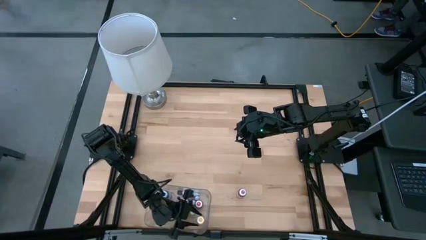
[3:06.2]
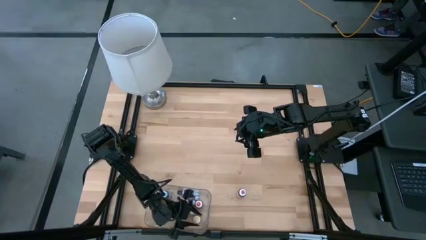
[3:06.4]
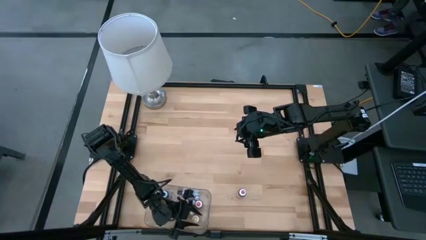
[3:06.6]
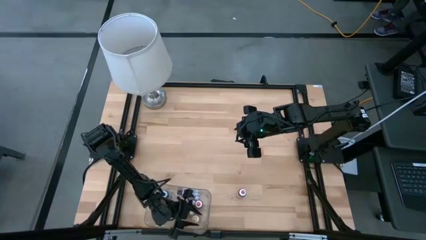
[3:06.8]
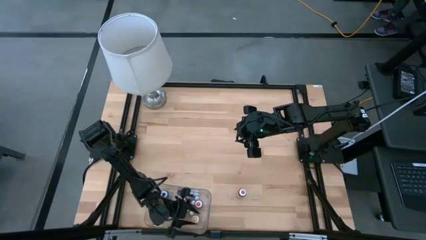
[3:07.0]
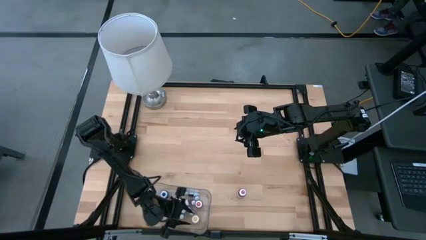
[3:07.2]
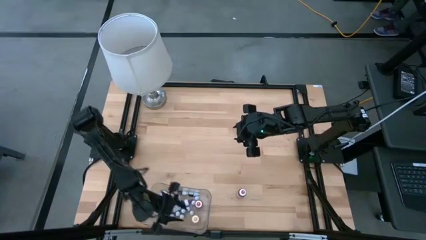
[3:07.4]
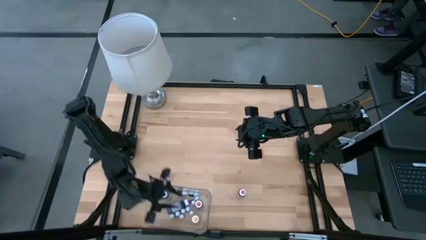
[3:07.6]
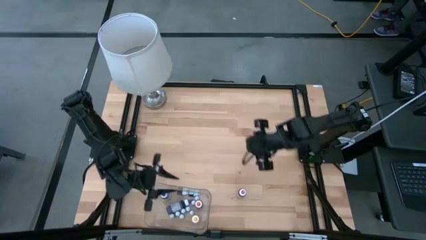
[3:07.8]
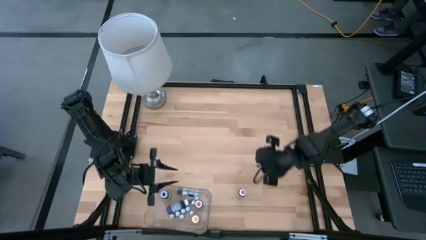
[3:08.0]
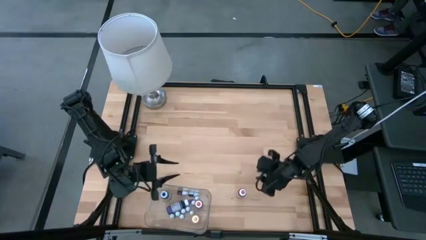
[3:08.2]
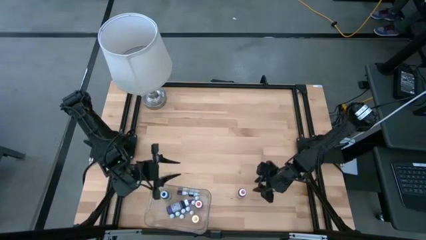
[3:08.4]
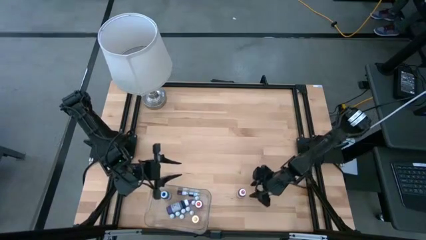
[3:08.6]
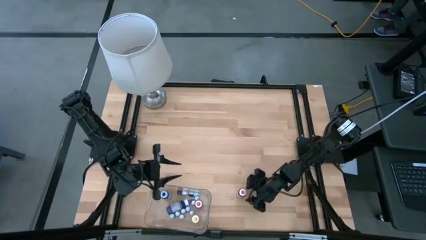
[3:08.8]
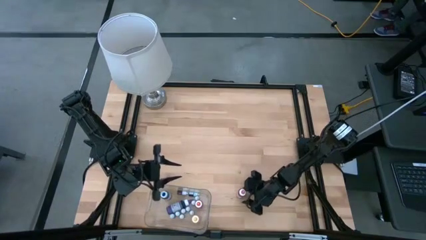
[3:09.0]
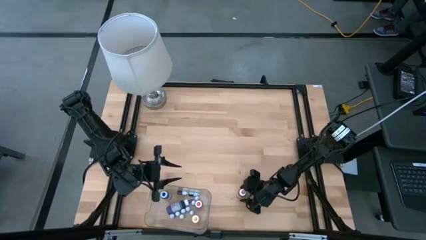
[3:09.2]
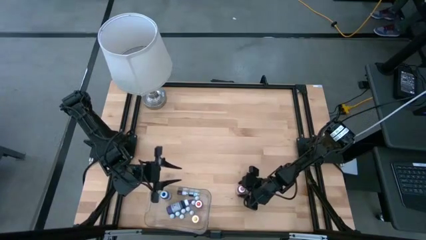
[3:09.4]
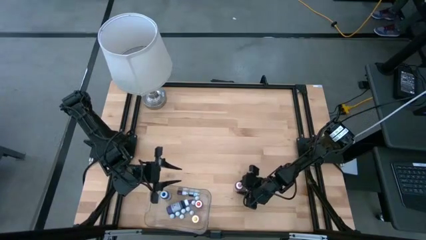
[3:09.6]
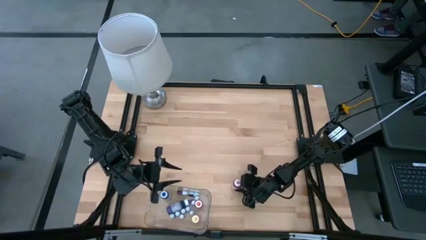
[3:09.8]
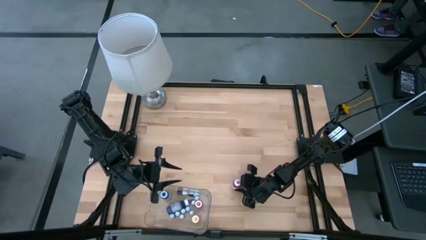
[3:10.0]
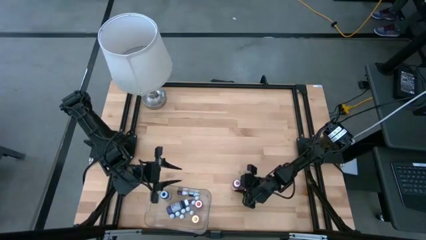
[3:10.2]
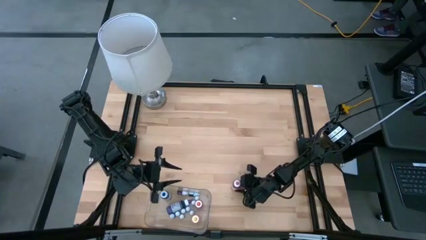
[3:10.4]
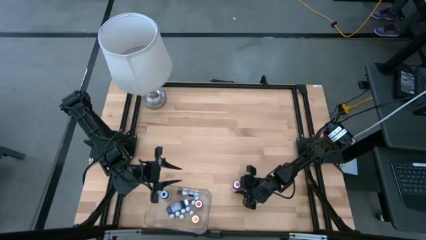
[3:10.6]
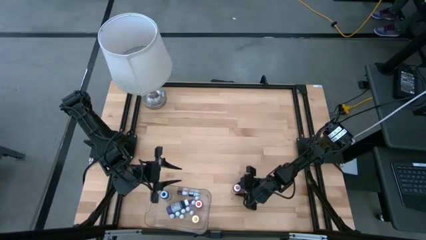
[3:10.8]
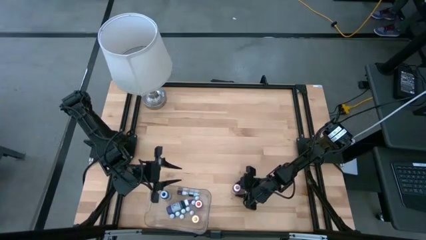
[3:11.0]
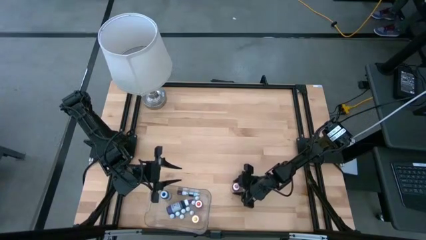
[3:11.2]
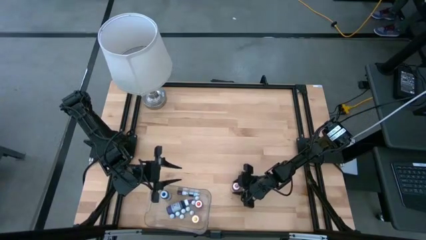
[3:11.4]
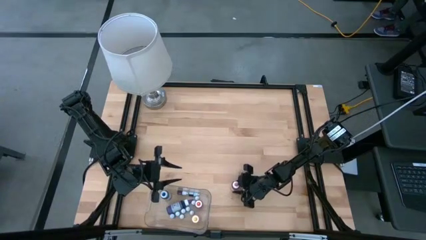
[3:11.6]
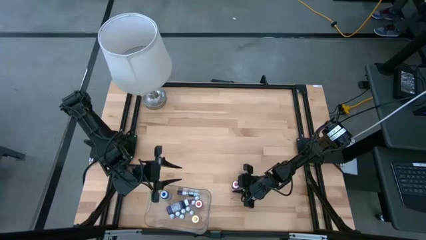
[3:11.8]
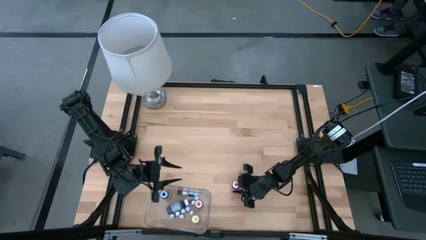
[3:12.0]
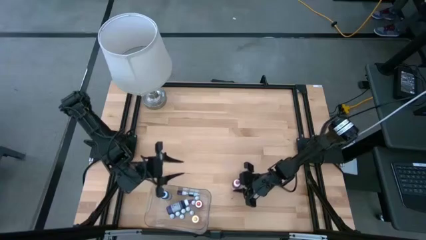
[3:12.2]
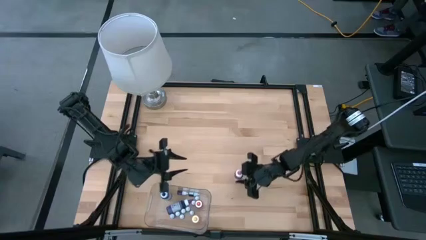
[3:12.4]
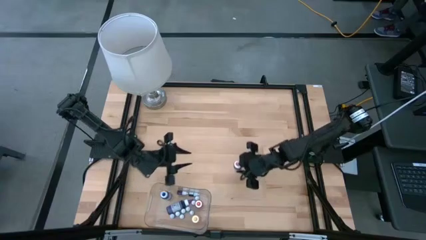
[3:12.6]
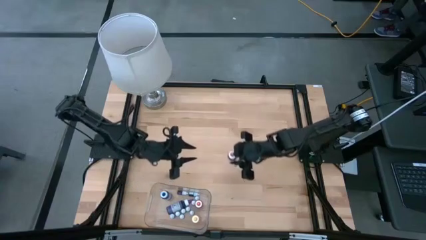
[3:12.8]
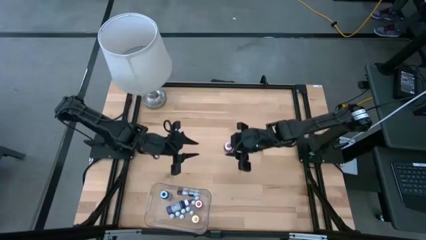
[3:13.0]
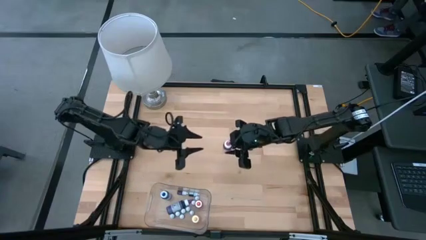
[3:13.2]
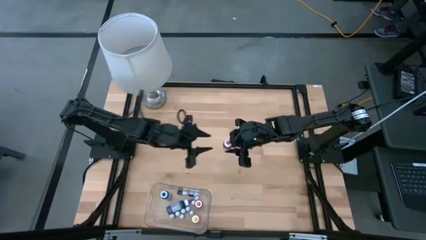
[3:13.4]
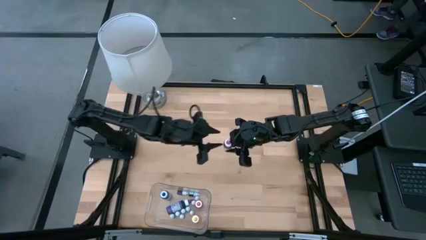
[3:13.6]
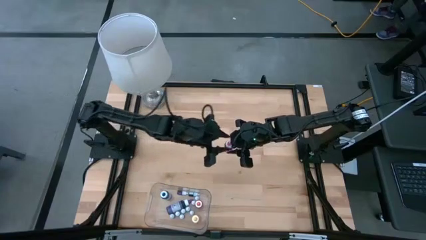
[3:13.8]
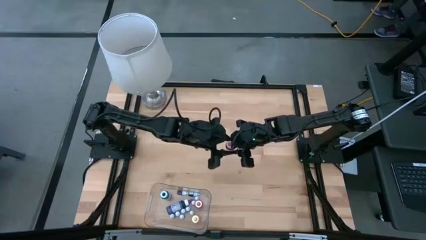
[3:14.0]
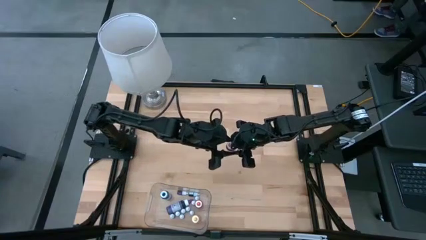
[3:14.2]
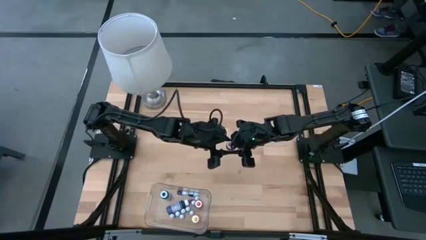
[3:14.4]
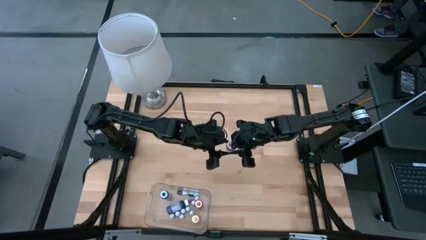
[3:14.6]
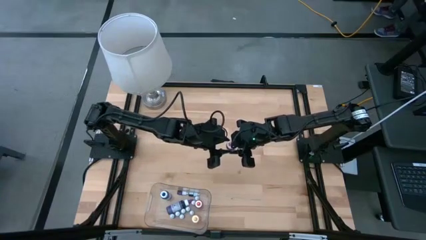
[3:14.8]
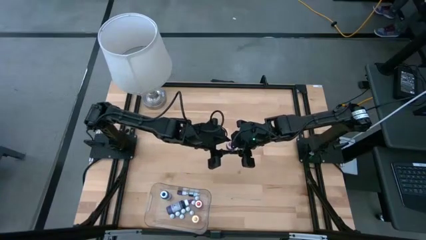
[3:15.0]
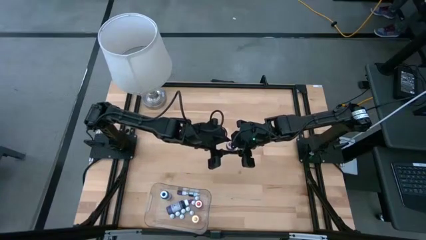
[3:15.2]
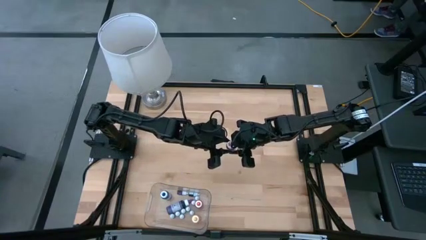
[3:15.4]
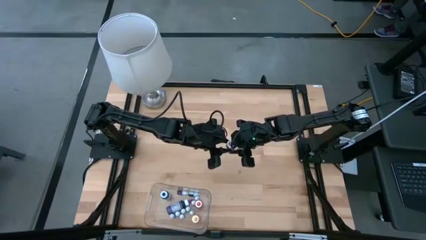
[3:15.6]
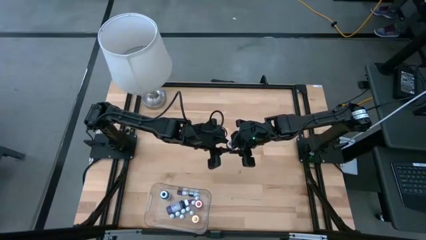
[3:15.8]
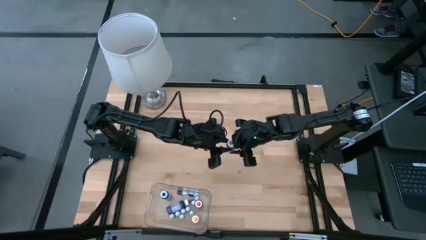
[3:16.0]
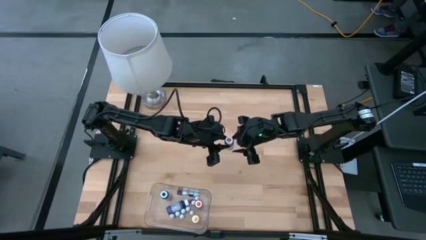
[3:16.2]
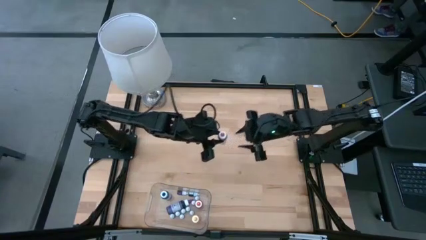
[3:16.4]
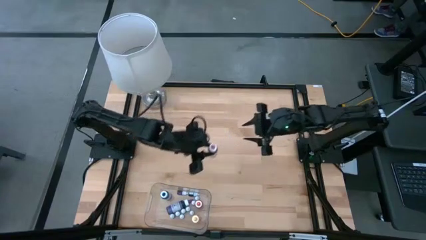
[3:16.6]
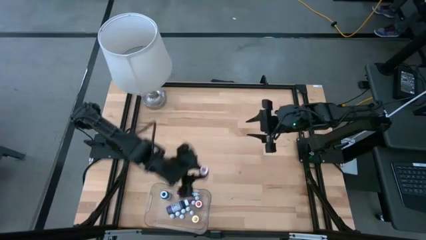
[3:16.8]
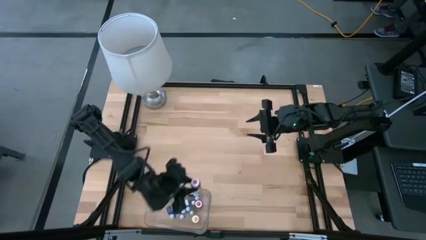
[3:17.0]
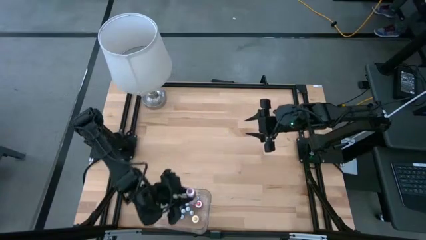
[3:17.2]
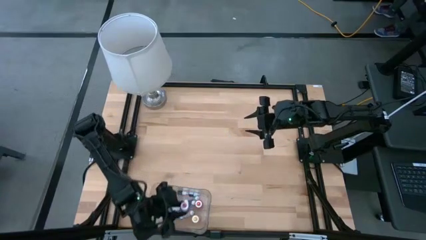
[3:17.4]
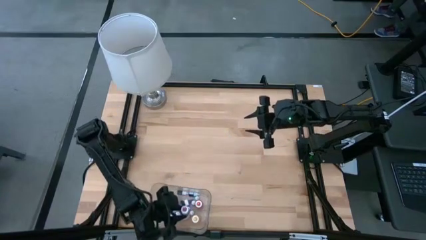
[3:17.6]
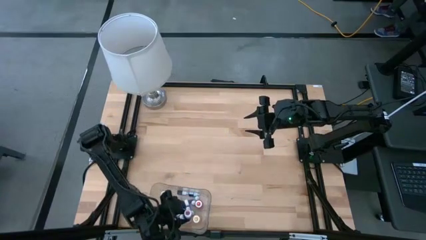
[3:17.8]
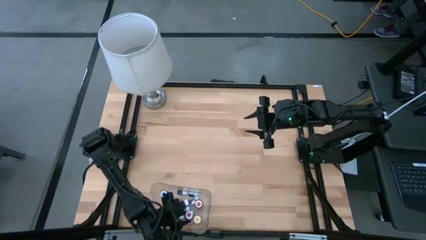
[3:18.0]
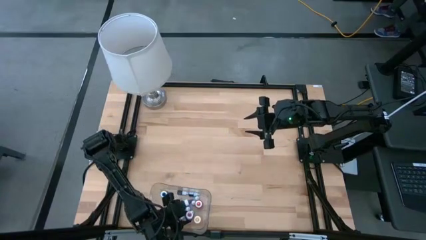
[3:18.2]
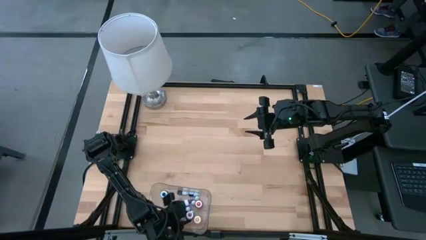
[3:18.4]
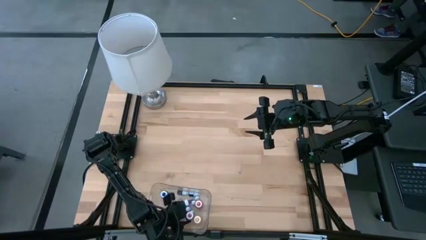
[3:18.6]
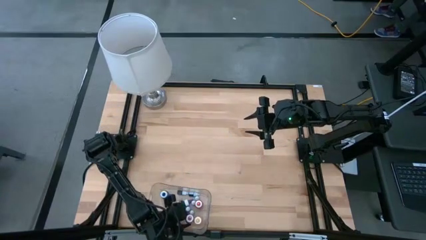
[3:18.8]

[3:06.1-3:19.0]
Task: Pick & Place food coloring
Put the large pink food coloring bottle into the bin

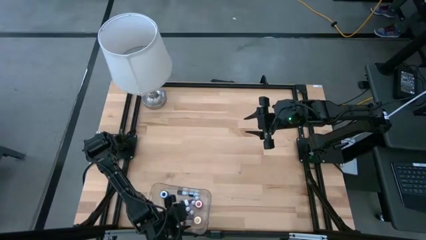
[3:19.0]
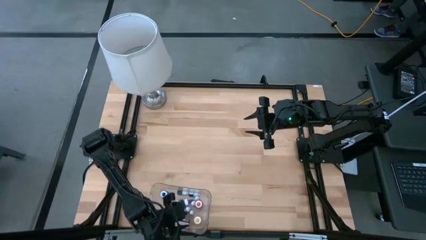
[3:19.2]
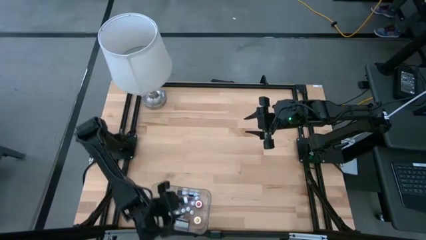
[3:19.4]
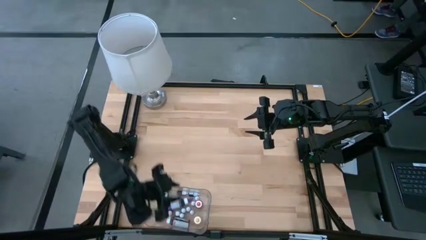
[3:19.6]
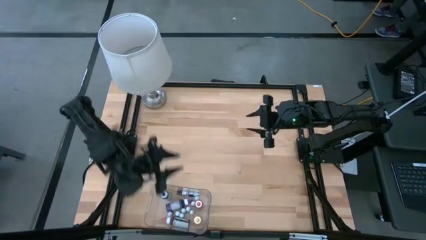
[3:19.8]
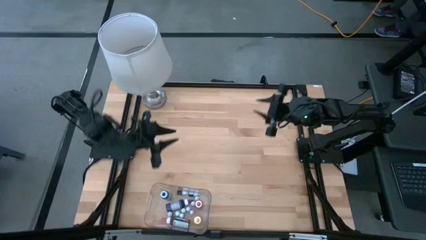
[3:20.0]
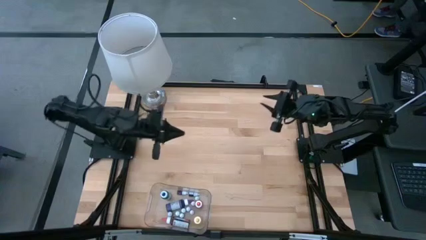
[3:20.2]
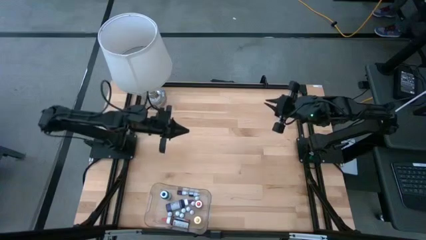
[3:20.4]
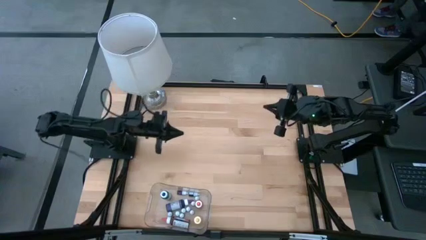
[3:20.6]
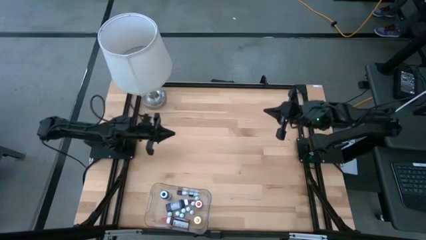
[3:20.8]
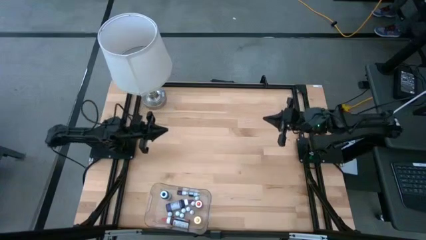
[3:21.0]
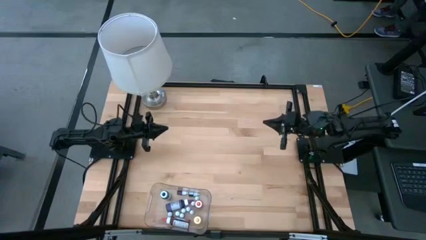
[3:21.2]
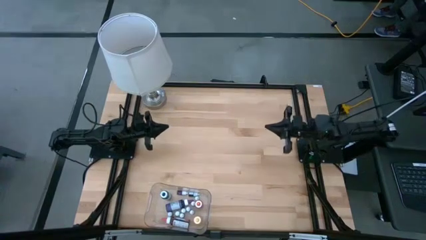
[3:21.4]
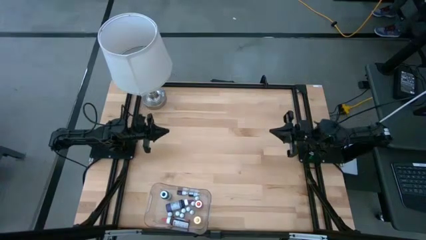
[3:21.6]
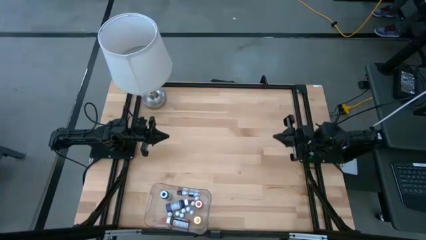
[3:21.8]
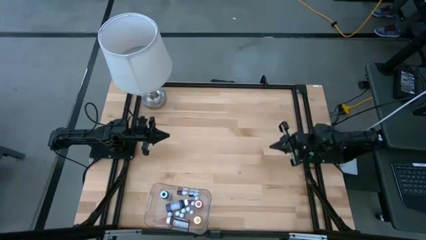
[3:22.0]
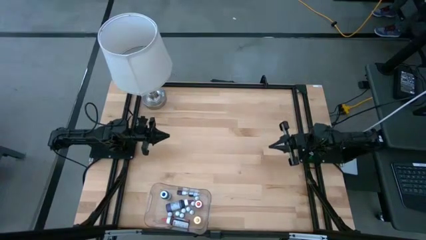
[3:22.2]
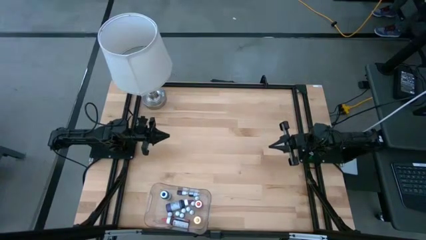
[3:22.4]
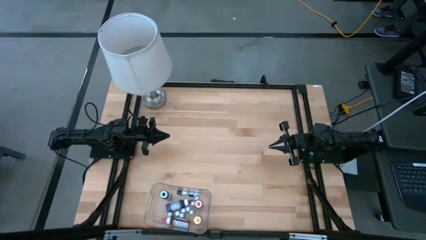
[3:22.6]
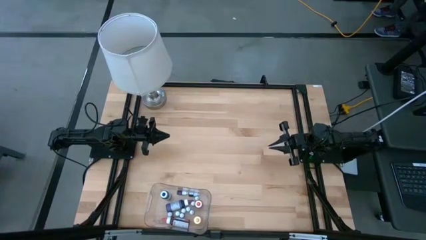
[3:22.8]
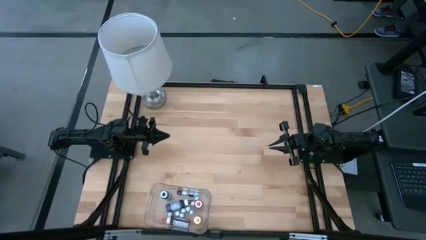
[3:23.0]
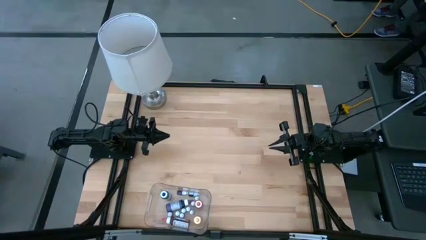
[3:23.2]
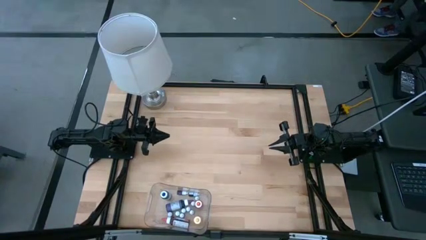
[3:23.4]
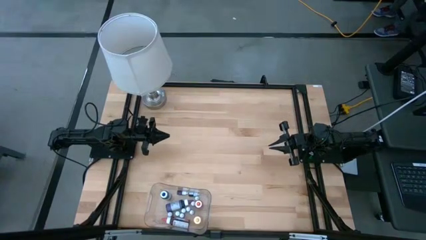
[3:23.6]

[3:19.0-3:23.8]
Return to Home Position
